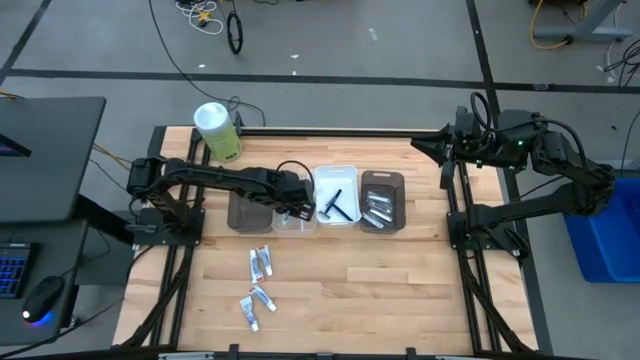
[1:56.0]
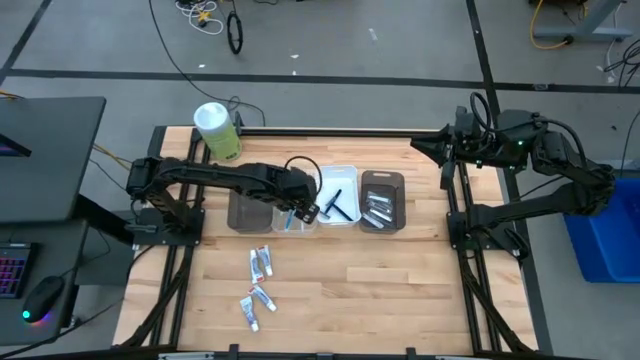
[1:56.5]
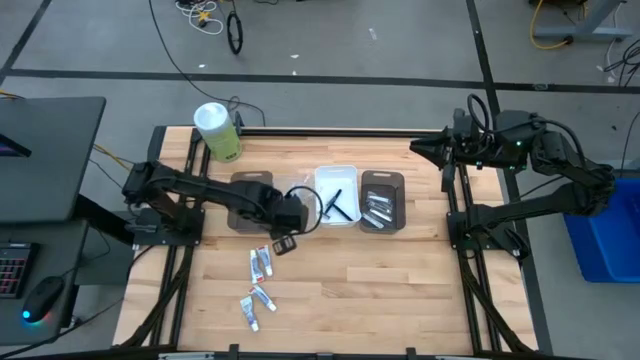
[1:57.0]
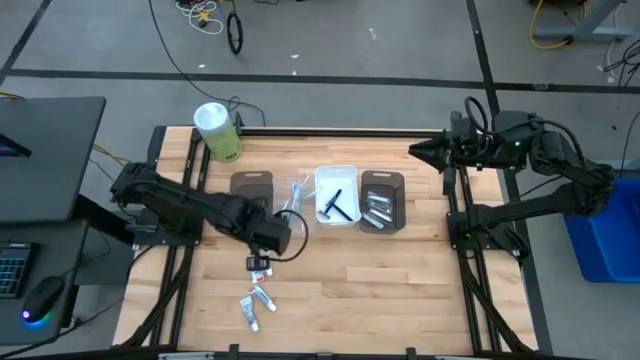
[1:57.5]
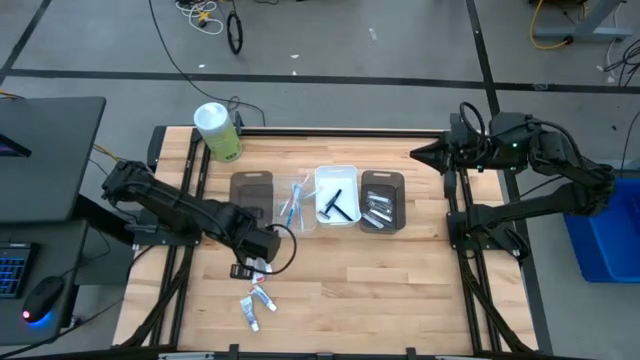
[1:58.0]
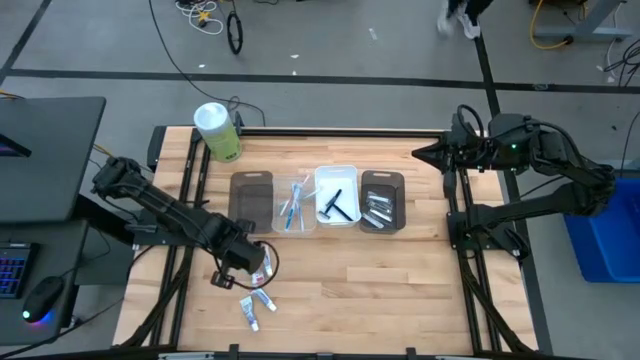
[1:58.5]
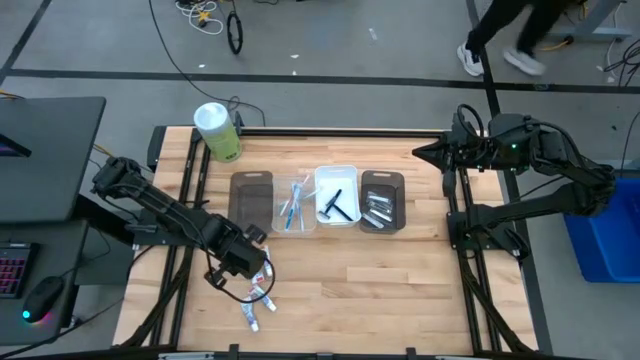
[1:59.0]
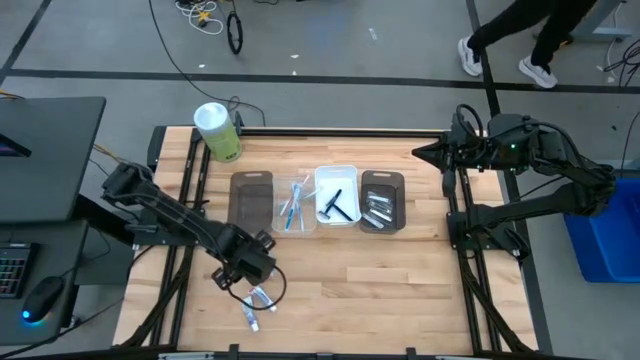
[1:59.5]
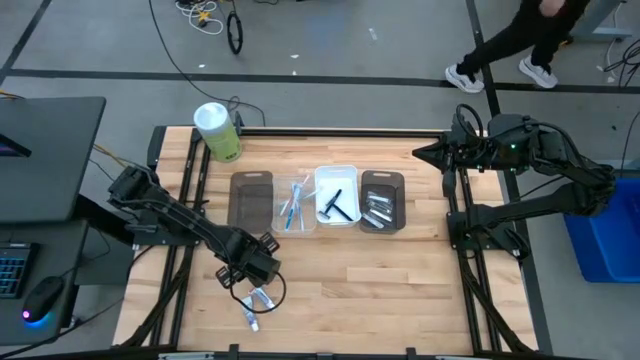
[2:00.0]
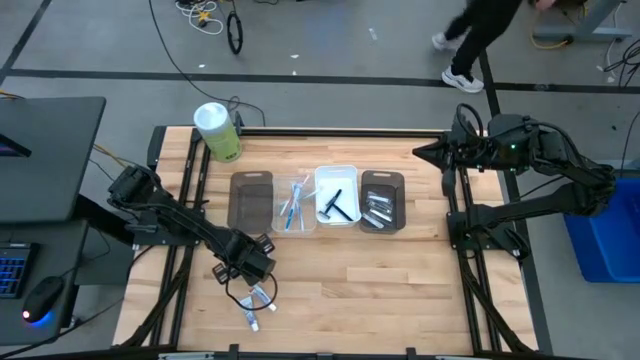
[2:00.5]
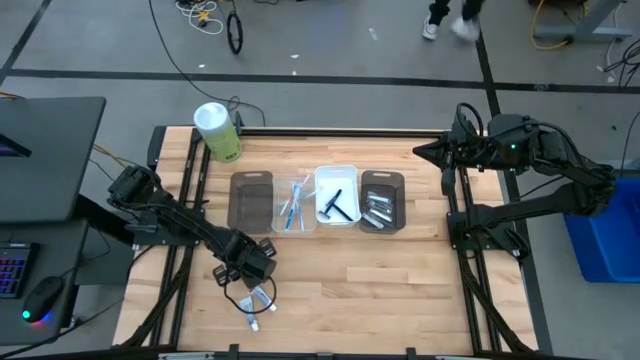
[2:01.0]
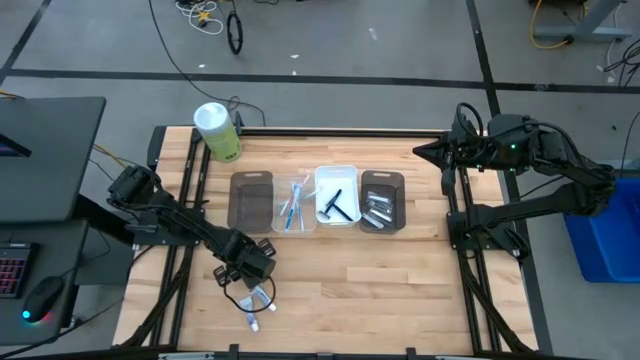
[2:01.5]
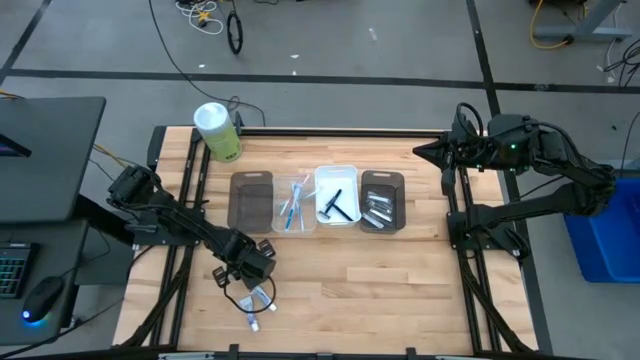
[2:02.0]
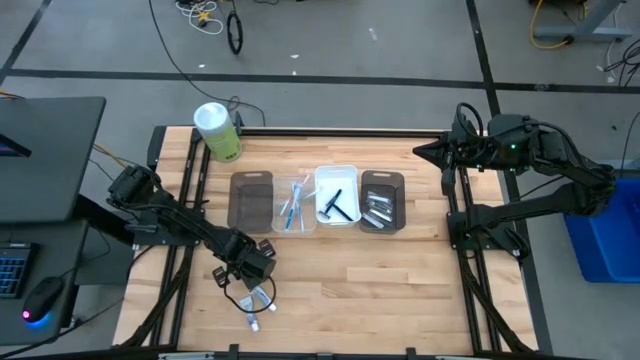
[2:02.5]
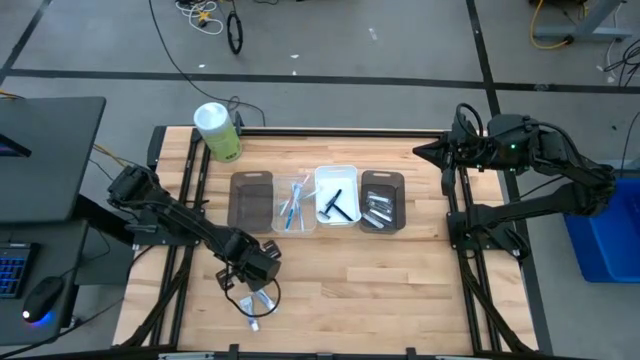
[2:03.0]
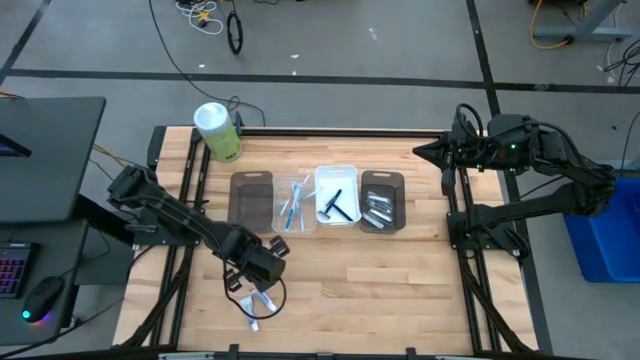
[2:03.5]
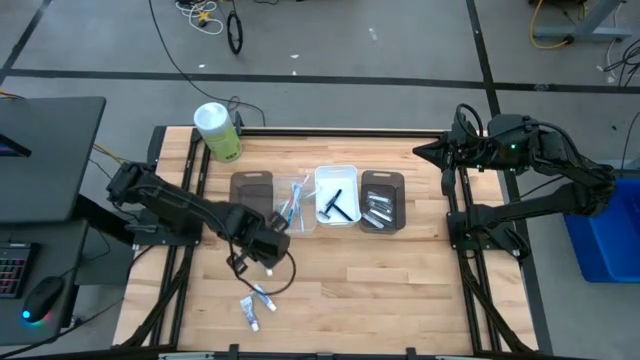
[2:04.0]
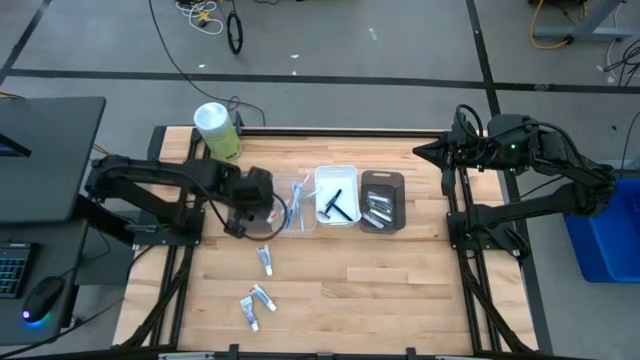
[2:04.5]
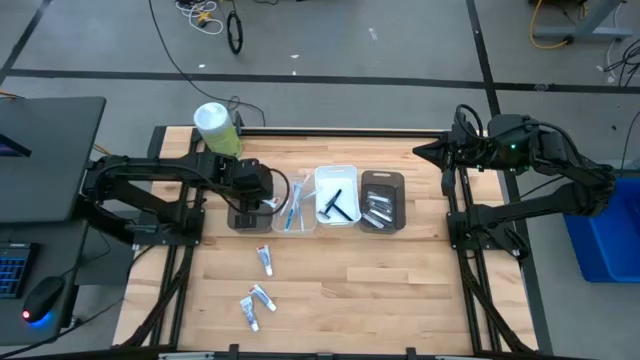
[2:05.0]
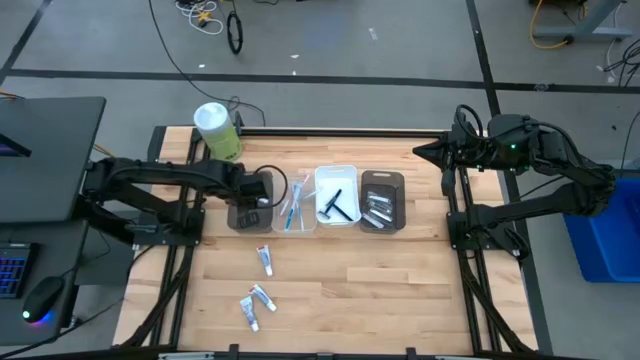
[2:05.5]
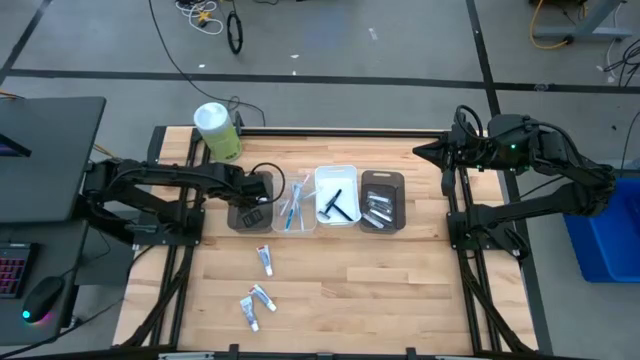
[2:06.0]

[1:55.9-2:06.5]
Task: Pick & Place Travel size toiletries
Put the white toothpaste into the left black bin

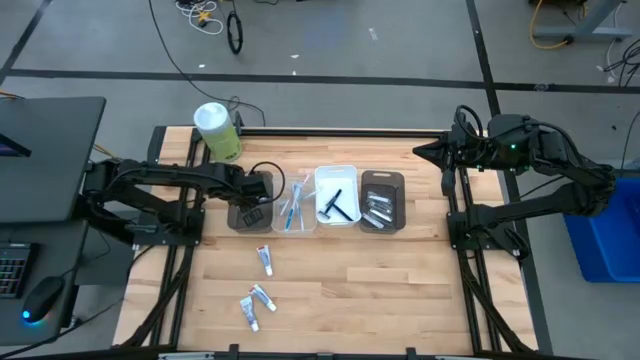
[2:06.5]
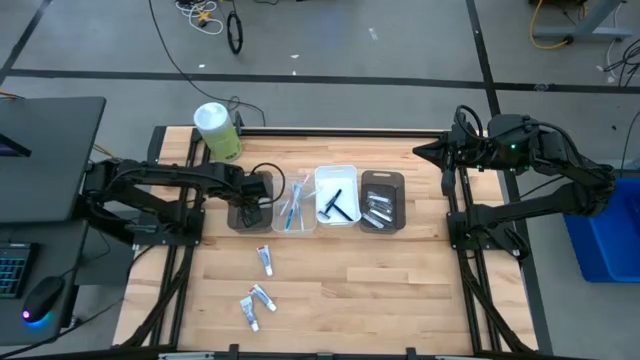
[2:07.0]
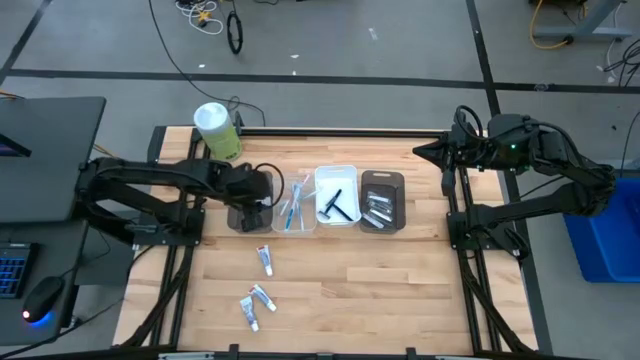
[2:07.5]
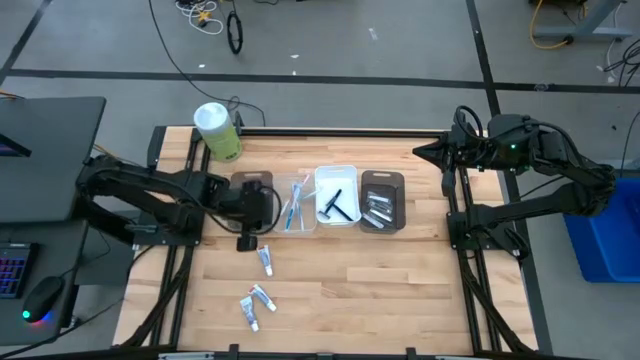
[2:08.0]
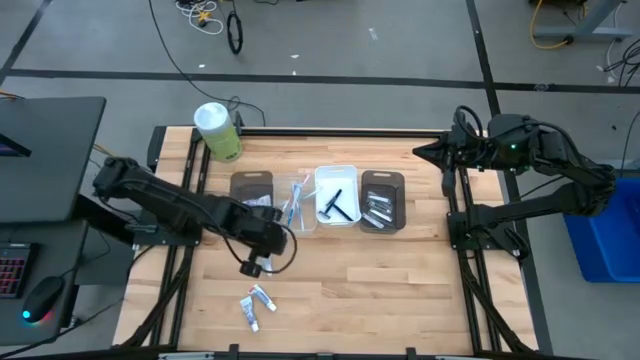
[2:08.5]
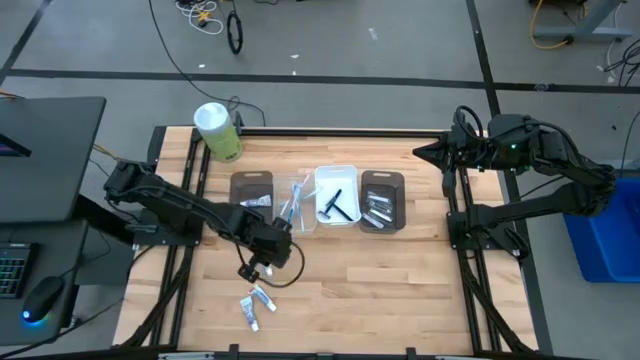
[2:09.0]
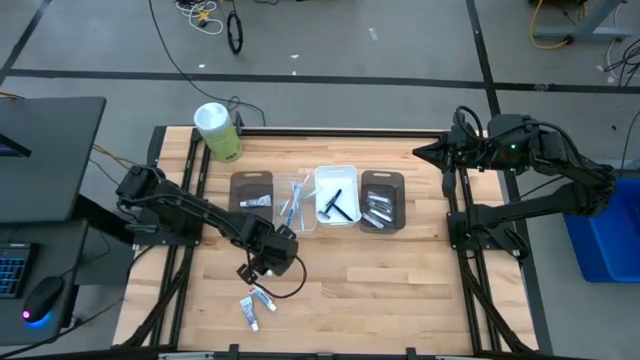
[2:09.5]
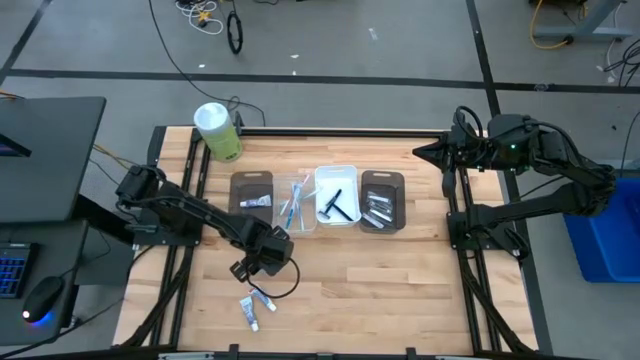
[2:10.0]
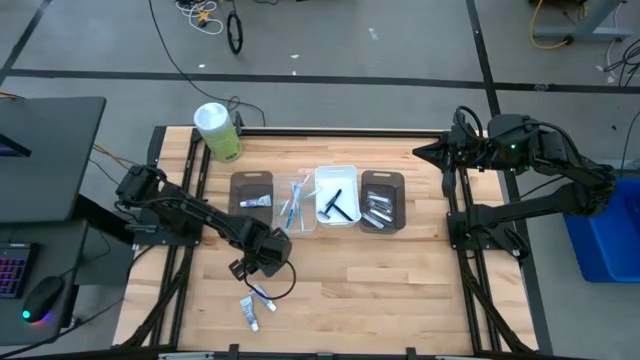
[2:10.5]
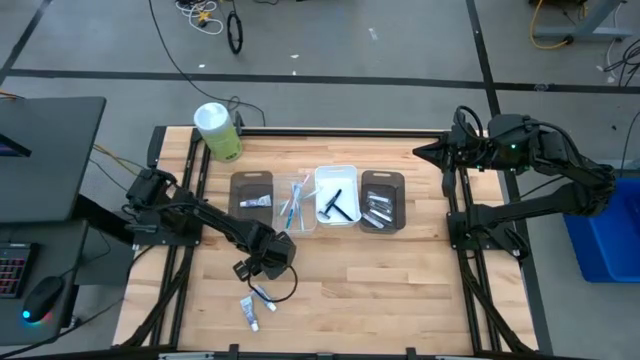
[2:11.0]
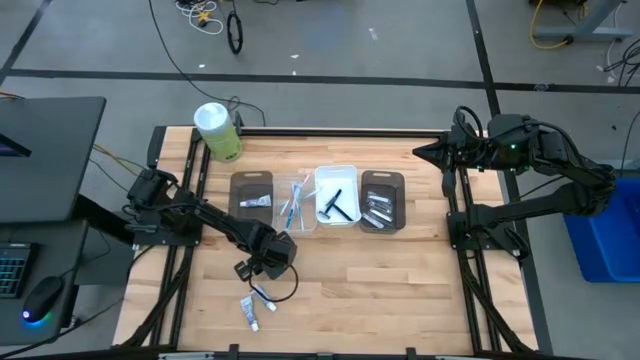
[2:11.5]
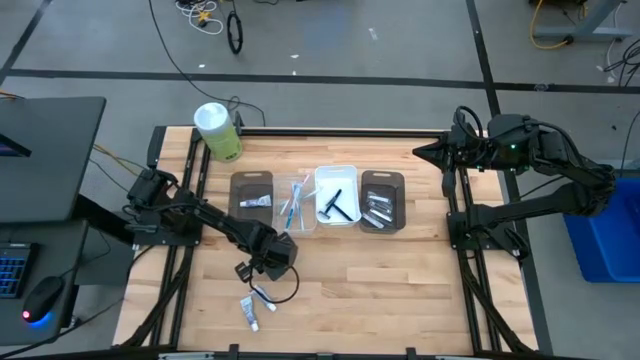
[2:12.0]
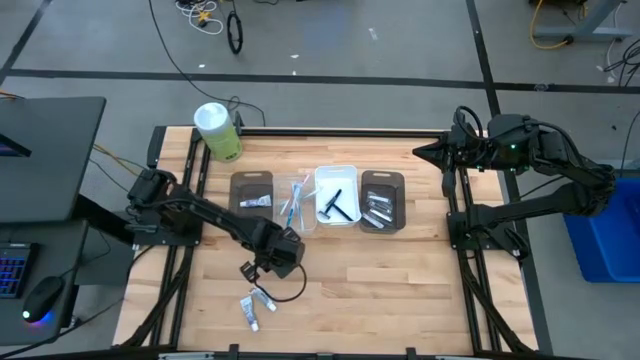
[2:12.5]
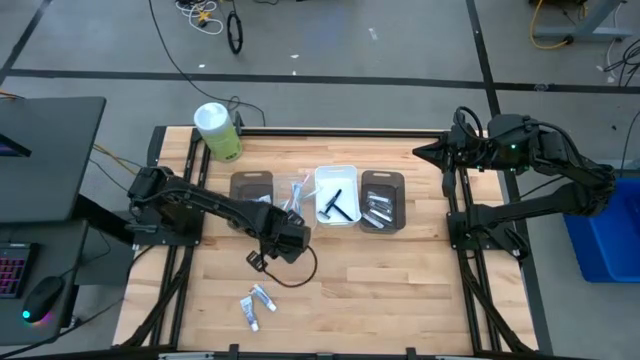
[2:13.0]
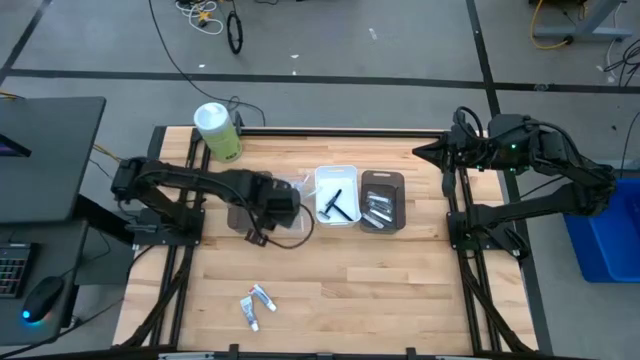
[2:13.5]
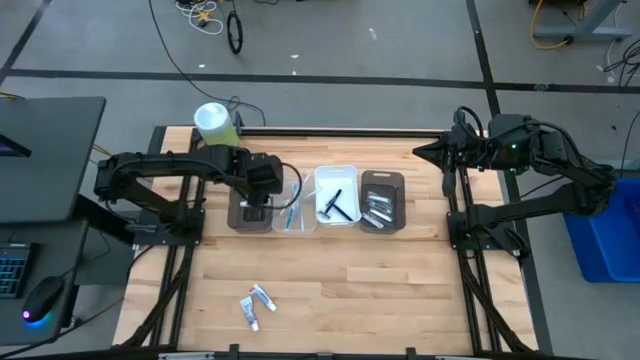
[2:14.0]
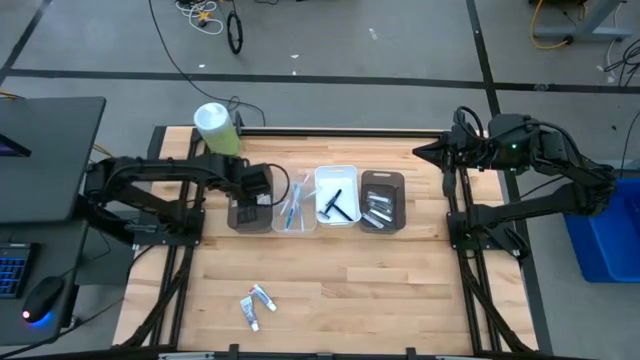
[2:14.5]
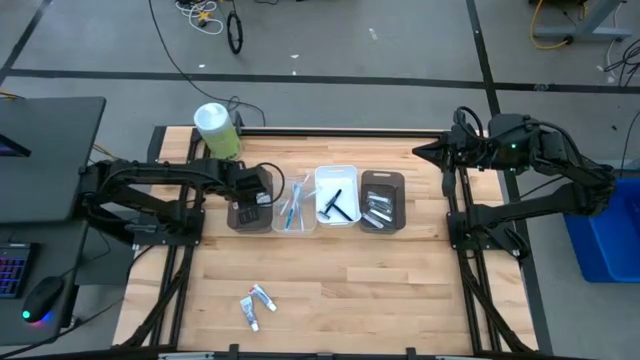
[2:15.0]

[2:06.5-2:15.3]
Put the white toothpaste into the left black bin
